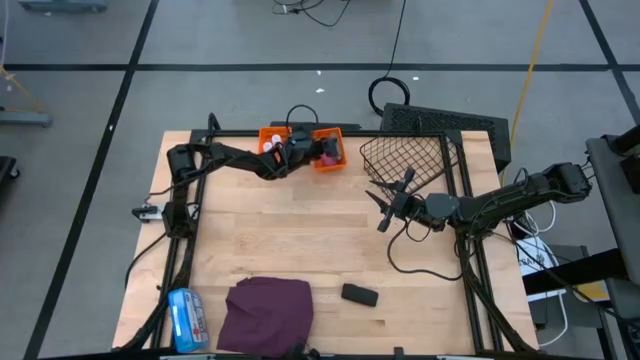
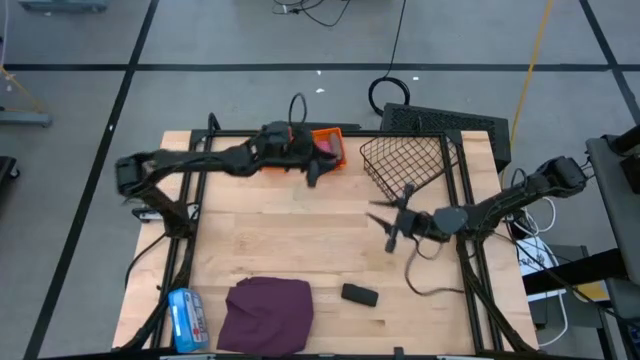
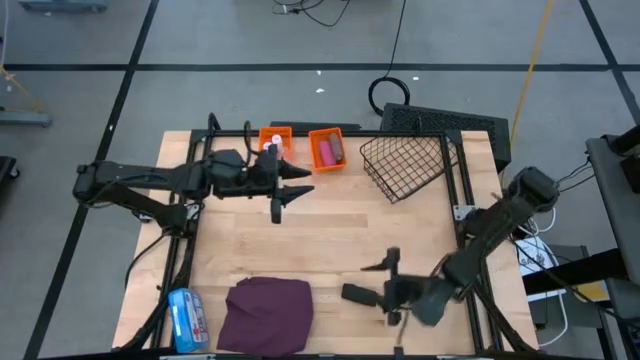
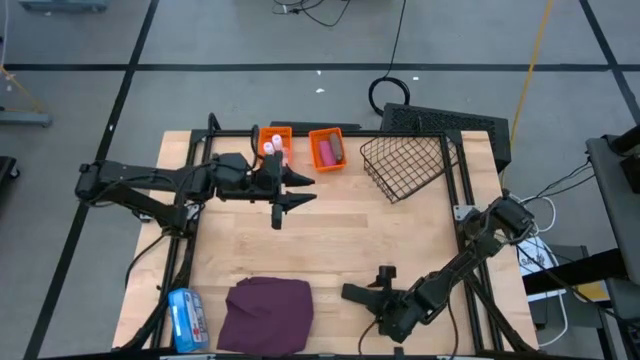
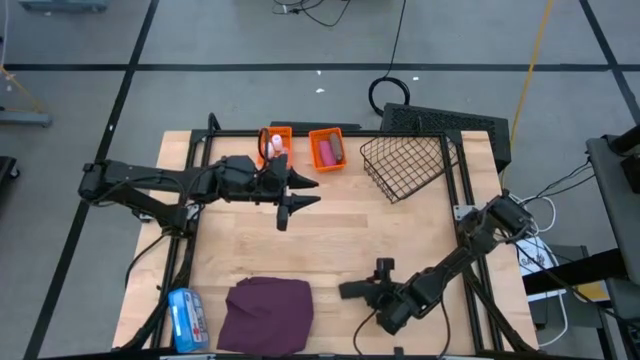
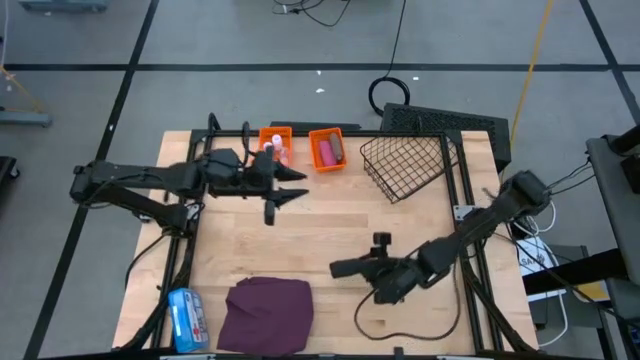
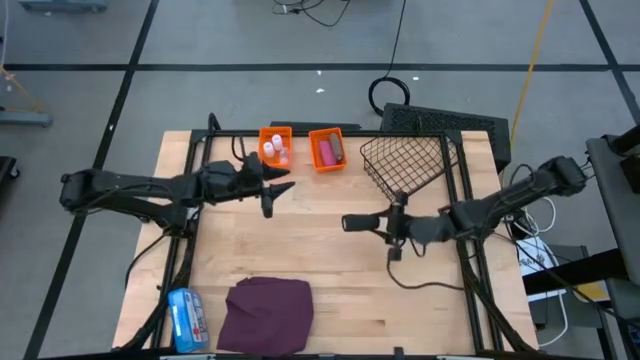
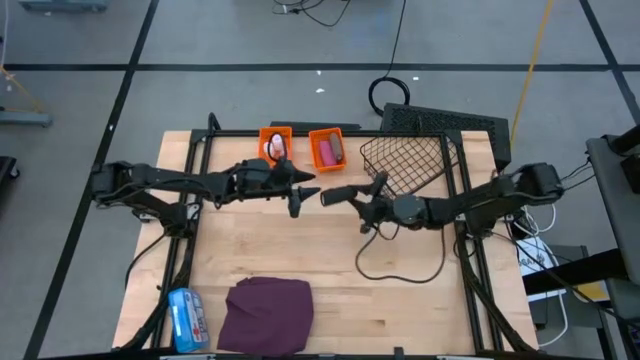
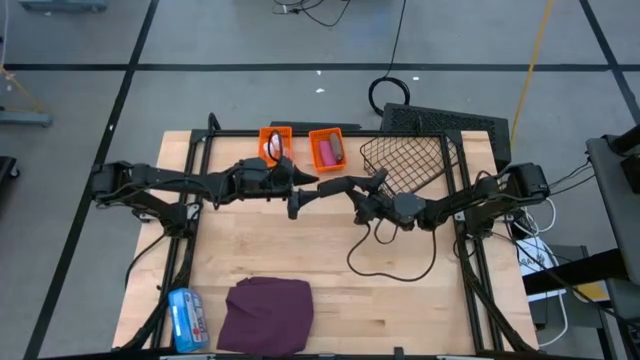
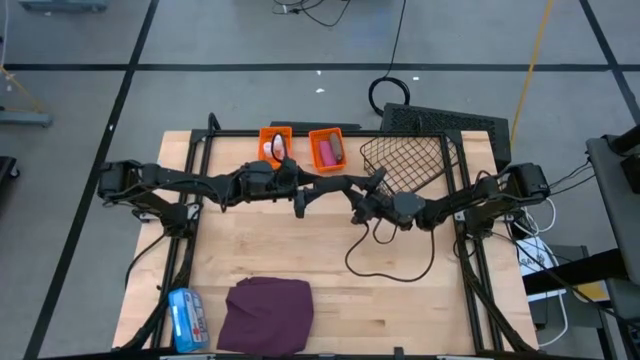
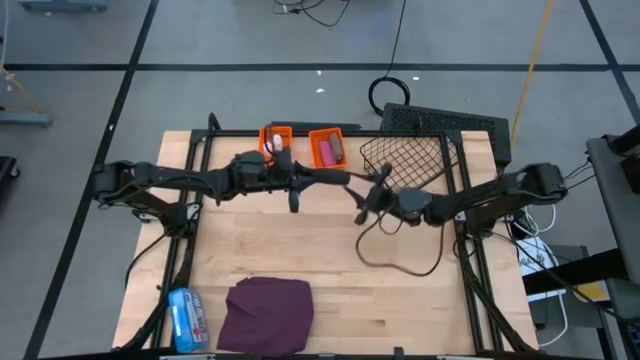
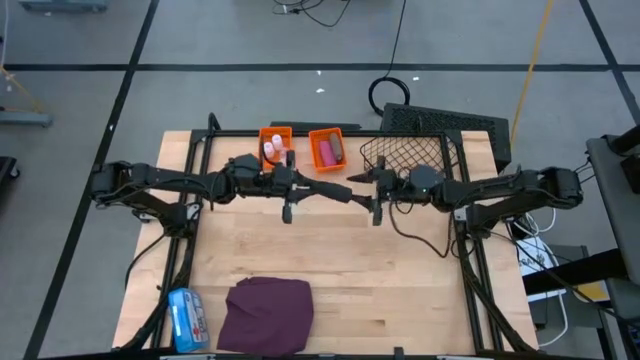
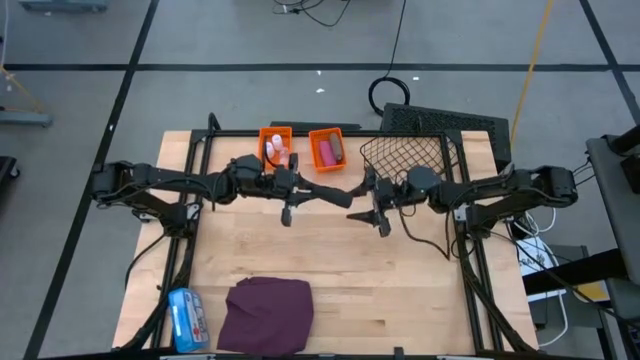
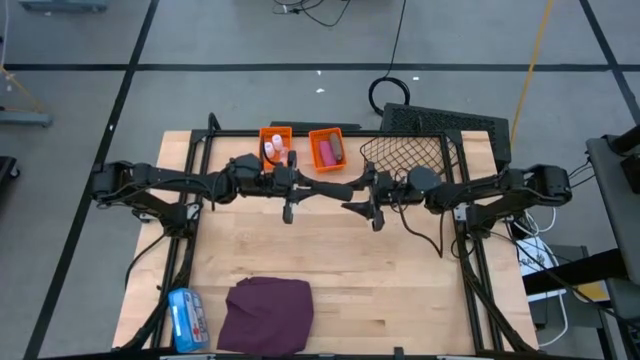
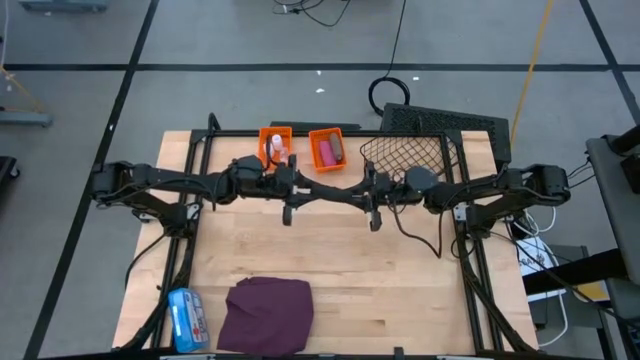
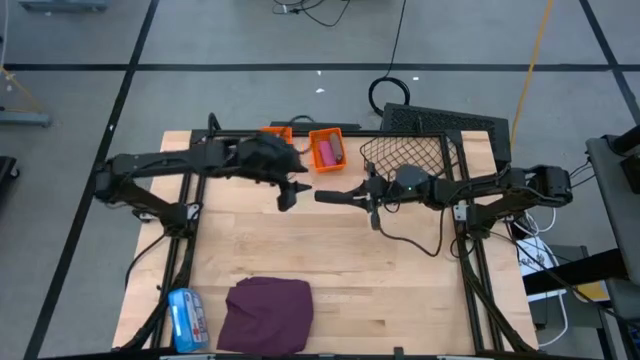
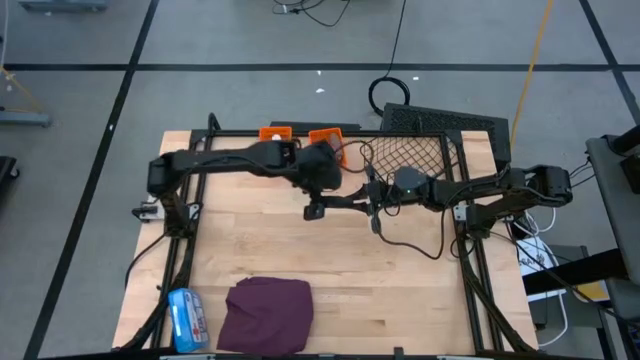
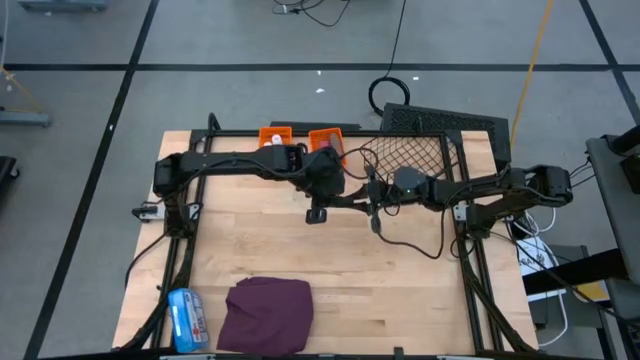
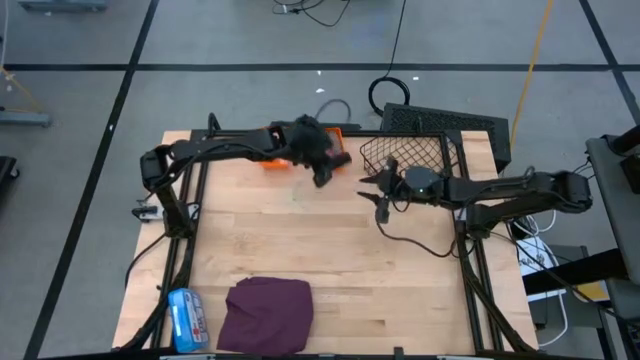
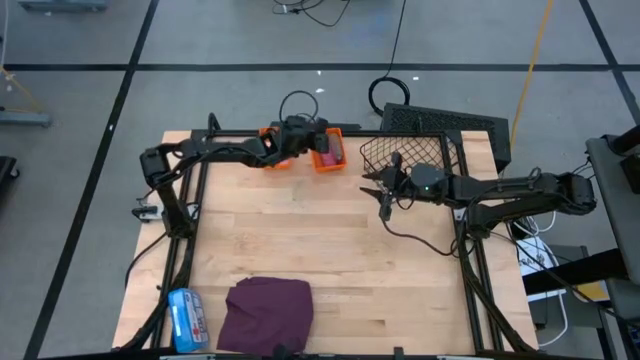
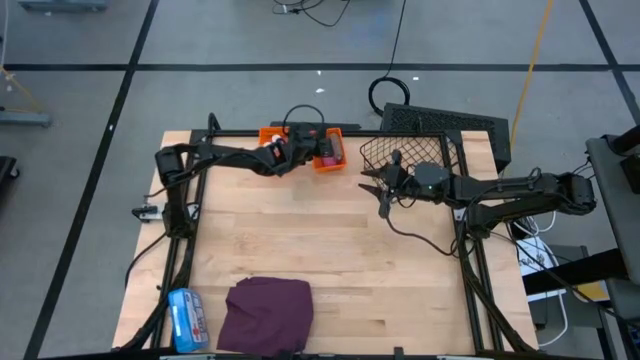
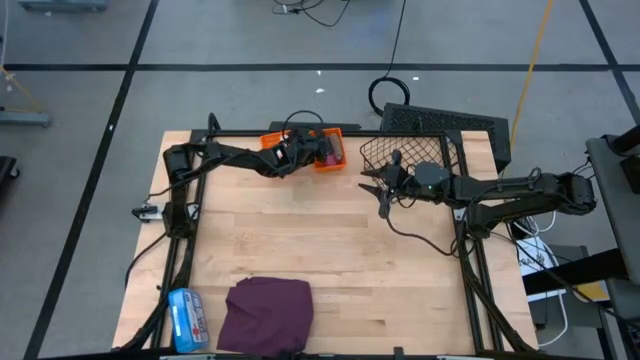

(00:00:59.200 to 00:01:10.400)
Task: Pick & Place Medicine items
Put the black bandage into the right orange bin

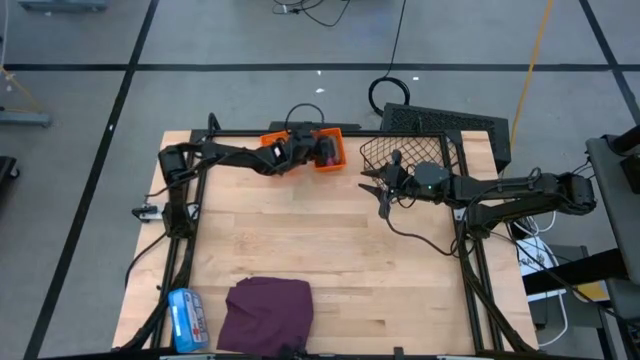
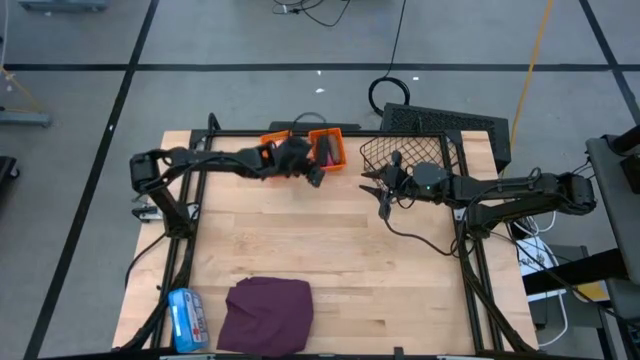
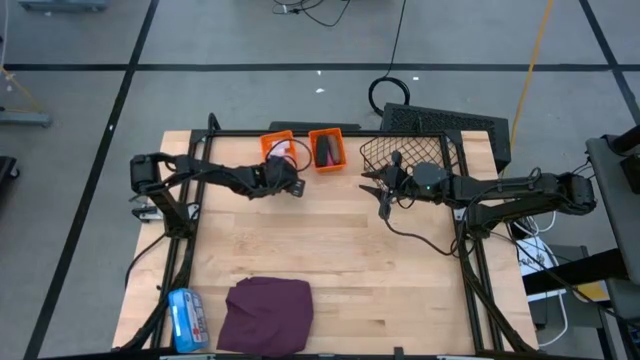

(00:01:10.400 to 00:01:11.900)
Adjust the orange bin

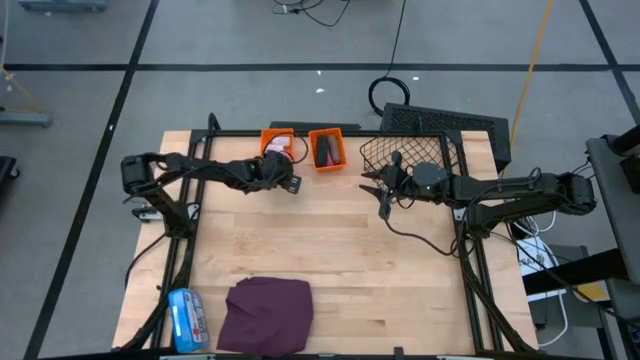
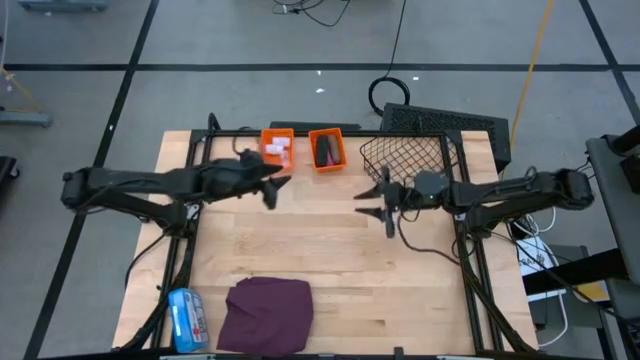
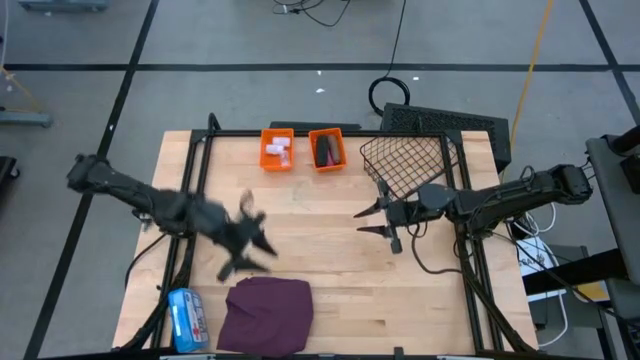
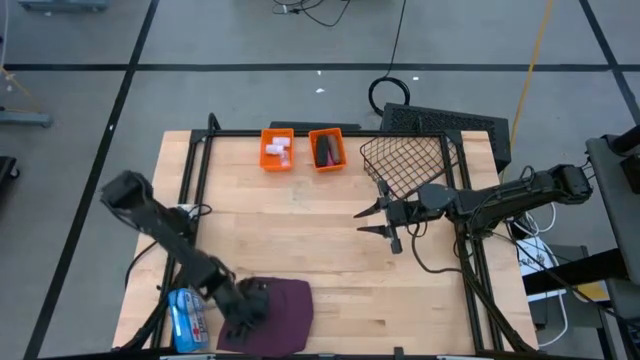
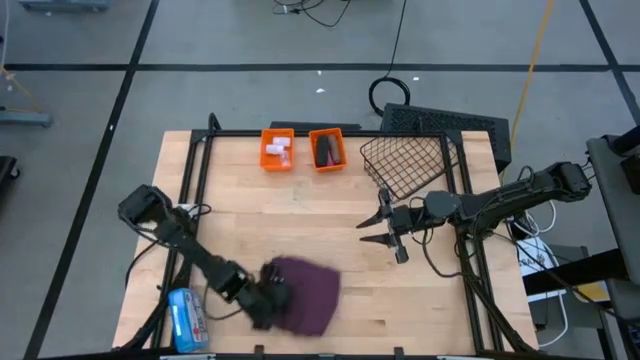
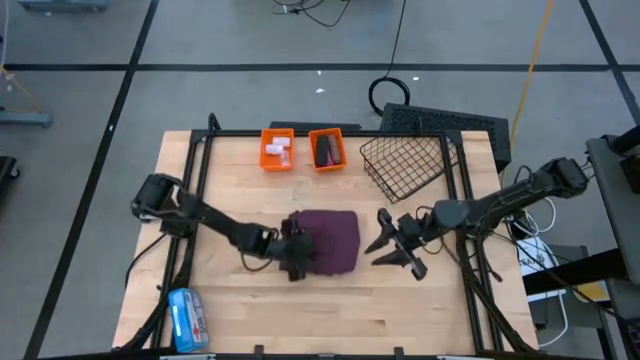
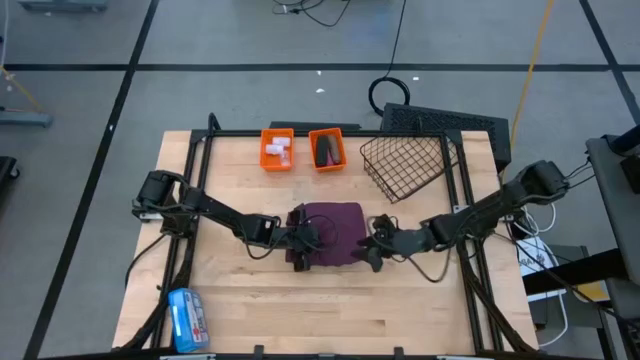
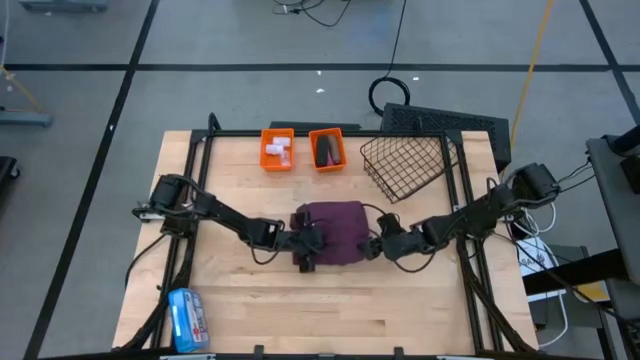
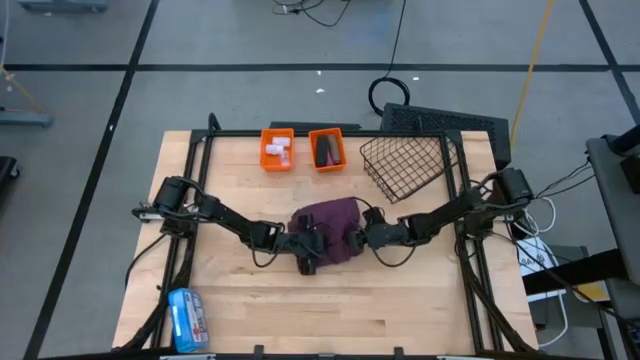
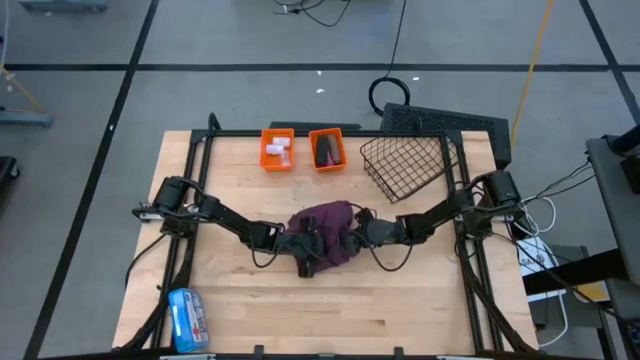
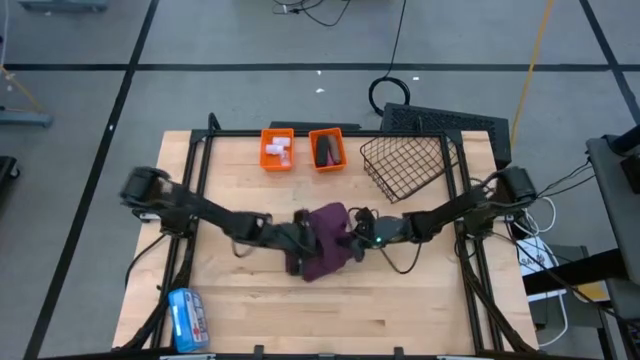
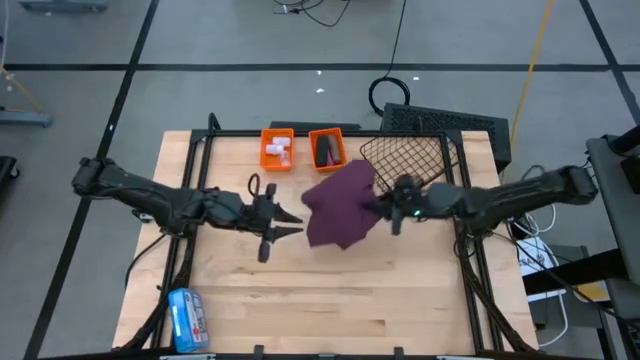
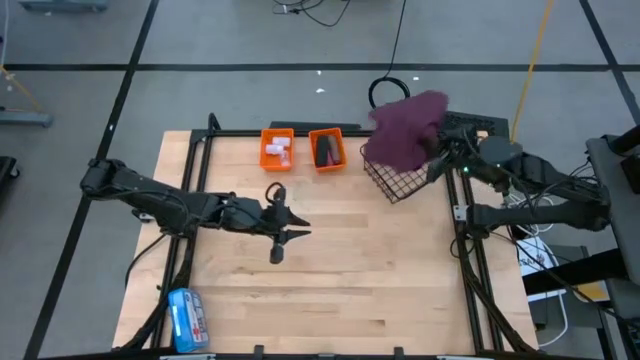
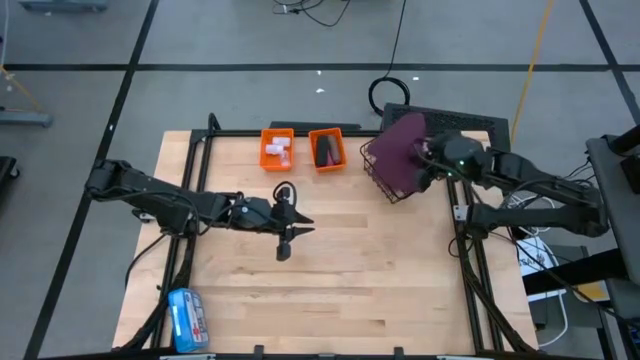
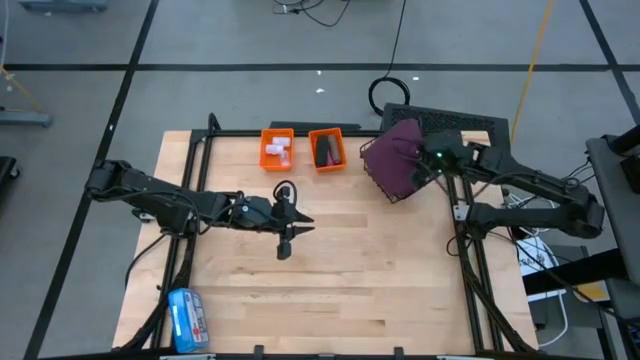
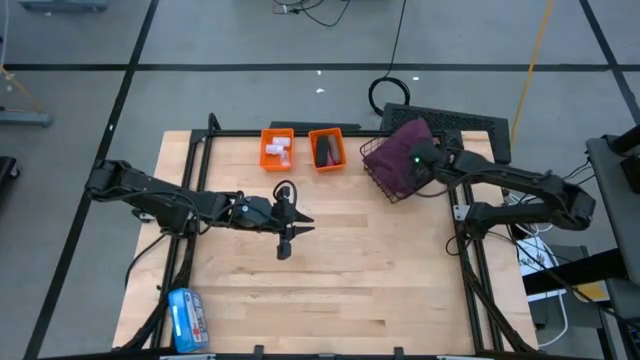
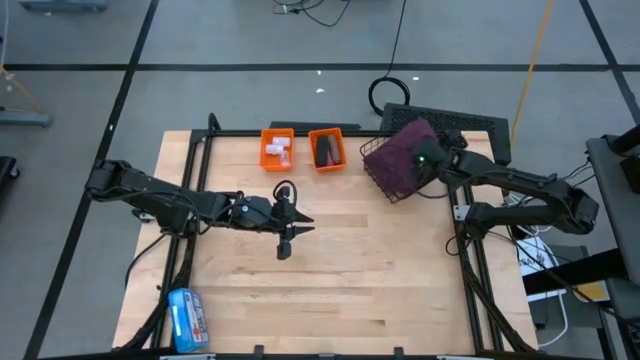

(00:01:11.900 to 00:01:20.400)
Put the purple patient gown into the wire basket
